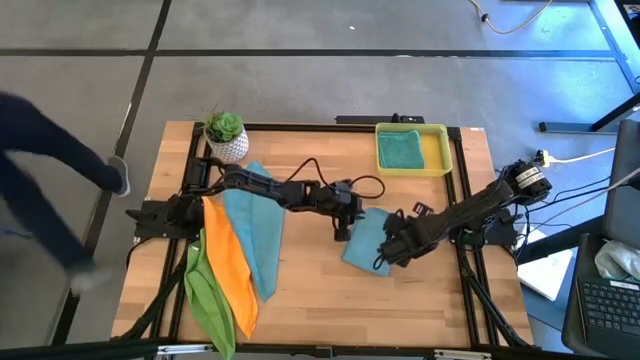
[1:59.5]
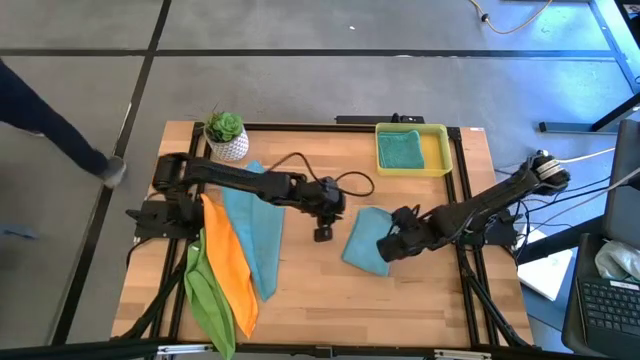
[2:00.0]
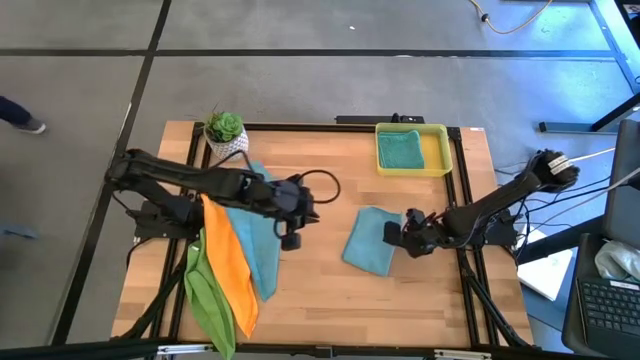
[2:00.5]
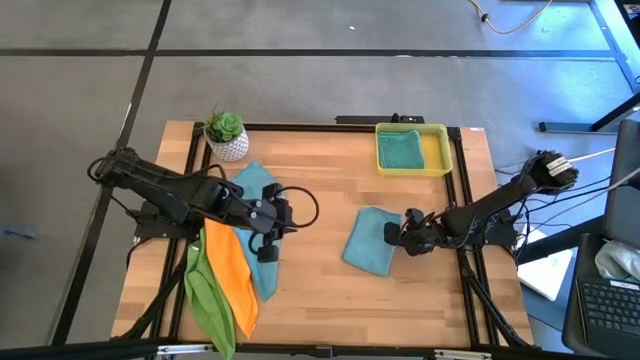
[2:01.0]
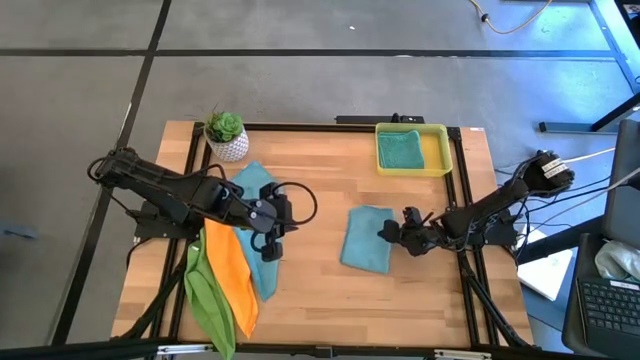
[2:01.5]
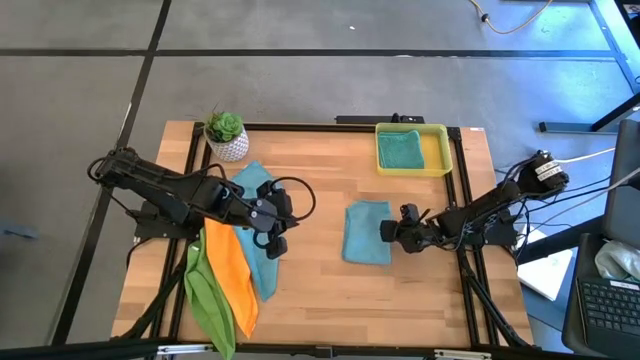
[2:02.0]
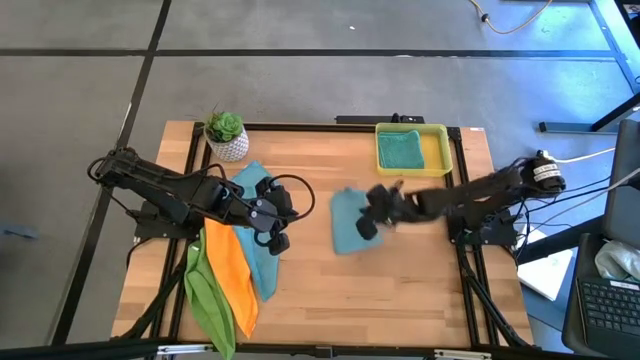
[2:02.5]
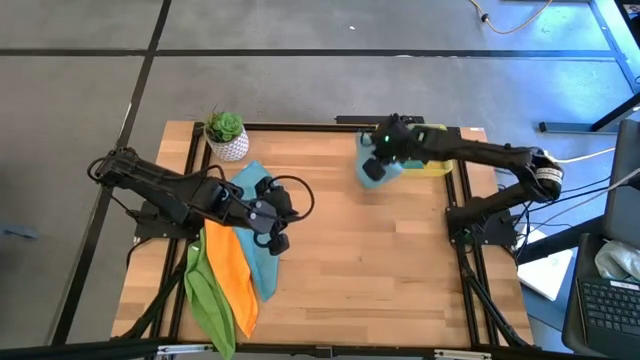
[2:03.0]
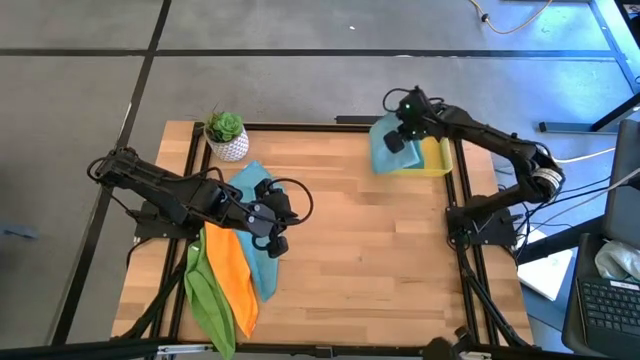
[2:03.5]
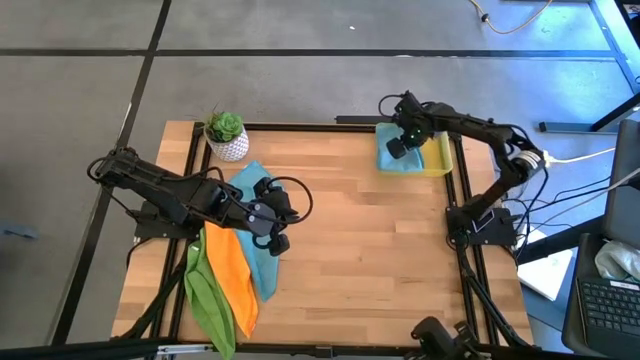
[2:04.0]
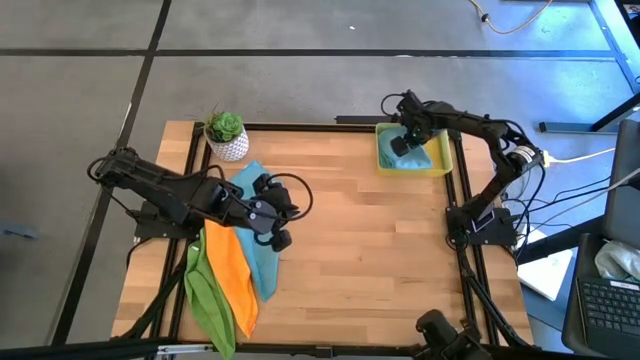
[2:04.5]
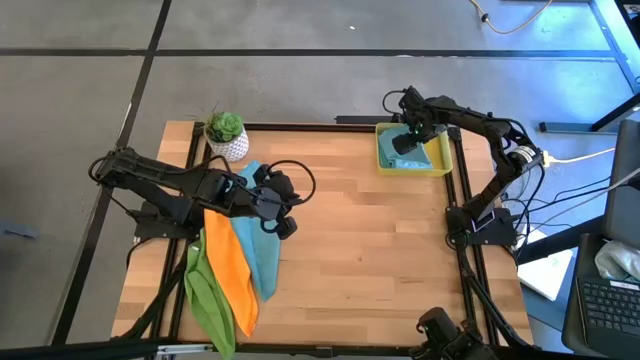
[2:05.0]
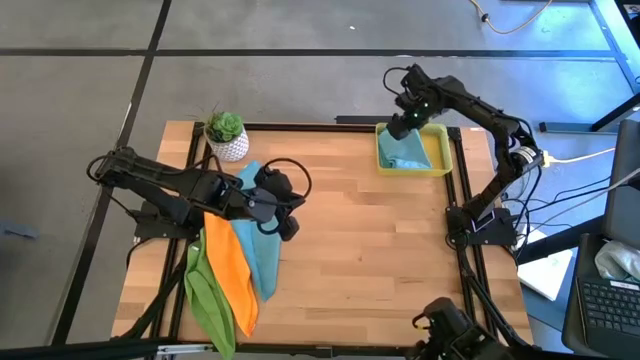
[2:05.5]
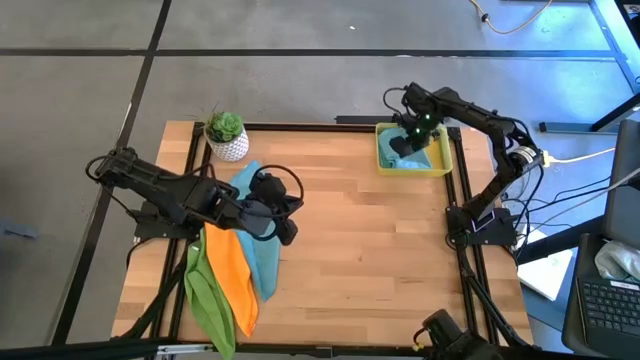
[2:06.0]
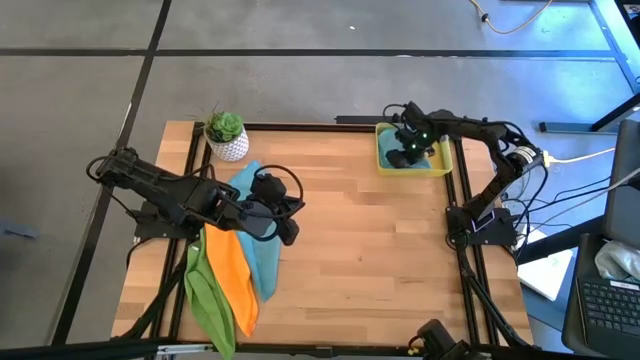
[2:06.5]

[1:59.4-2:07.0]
Task: Fold microfiber towels
Put the folded blue microfiber towel into the bin

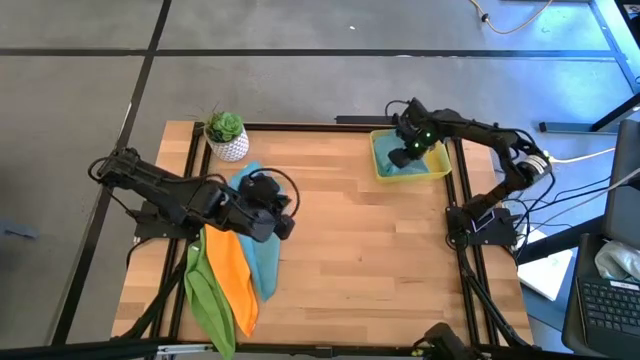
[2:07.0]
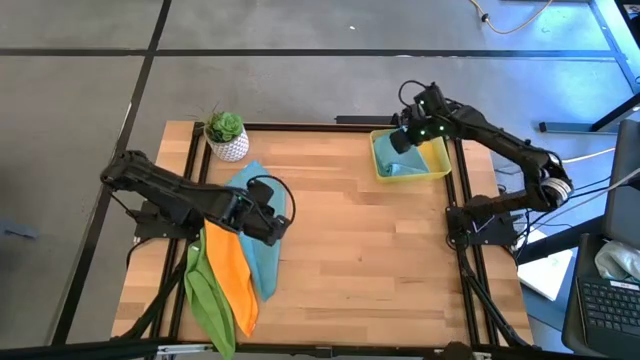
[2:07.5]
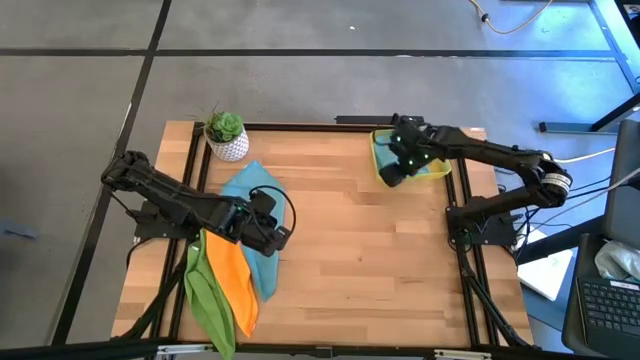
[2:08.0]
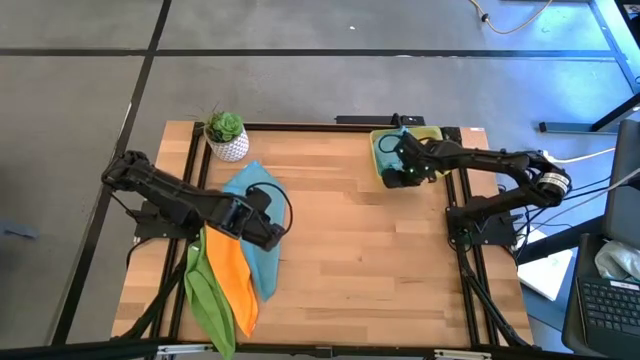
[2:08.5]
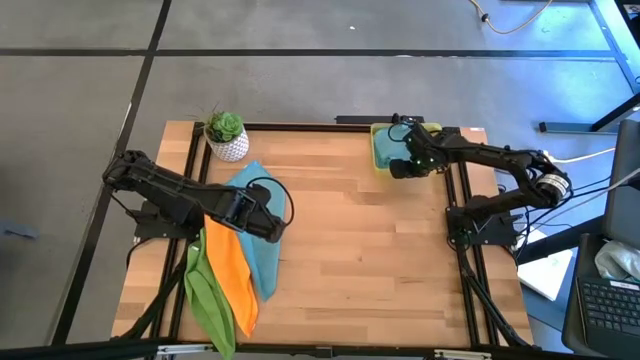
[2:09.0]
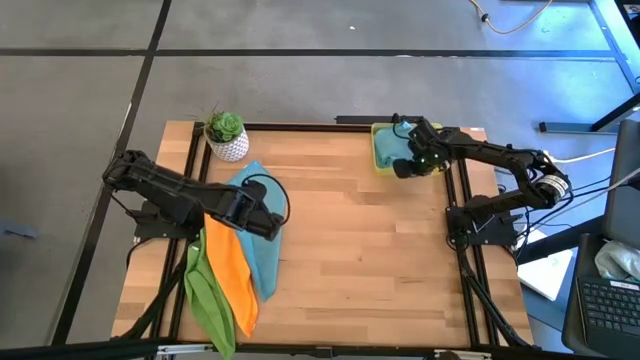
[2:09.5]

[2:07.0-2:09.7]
Adjust the bin

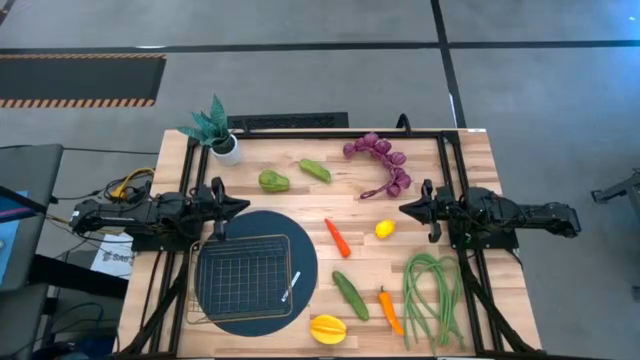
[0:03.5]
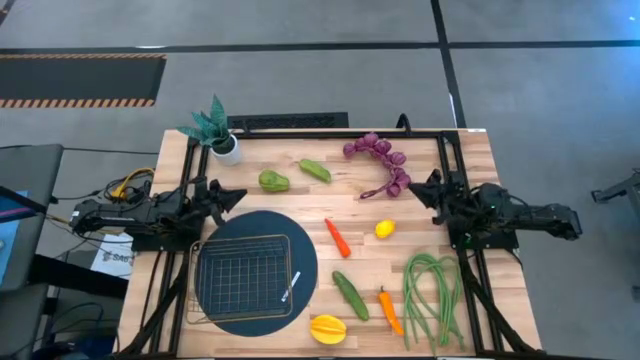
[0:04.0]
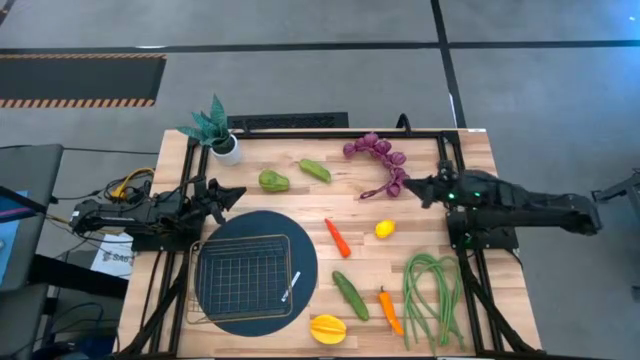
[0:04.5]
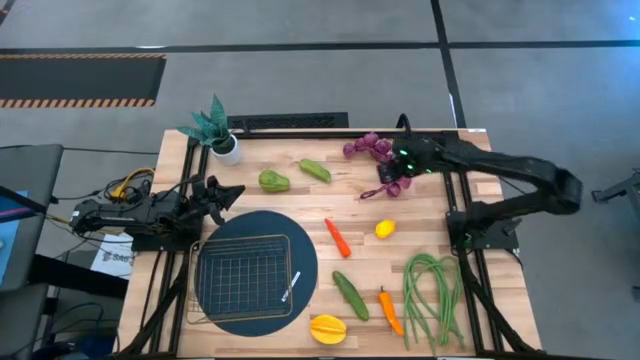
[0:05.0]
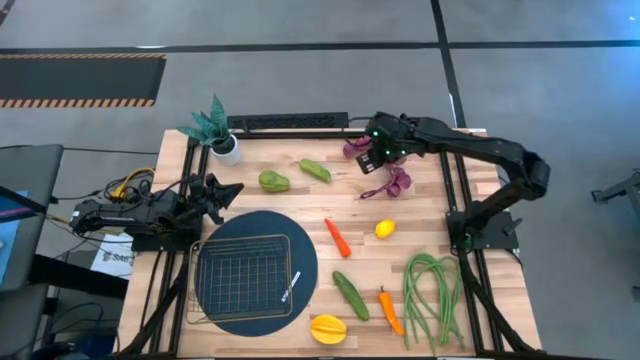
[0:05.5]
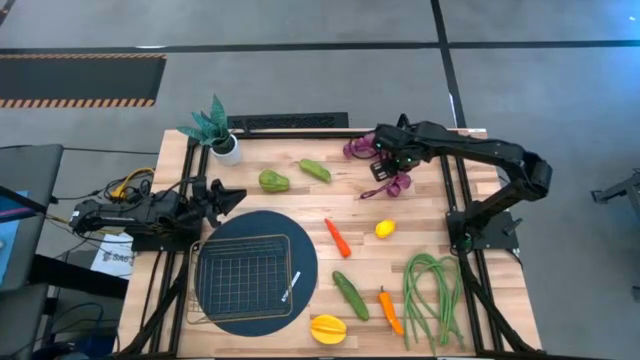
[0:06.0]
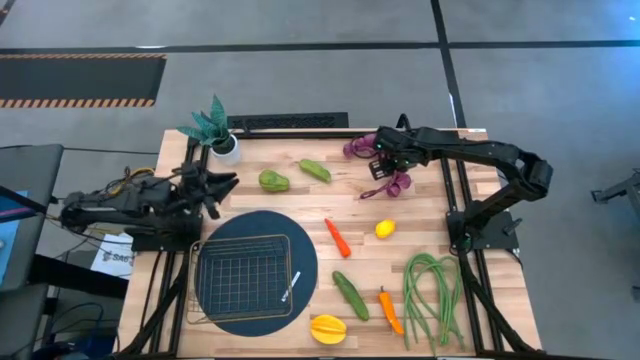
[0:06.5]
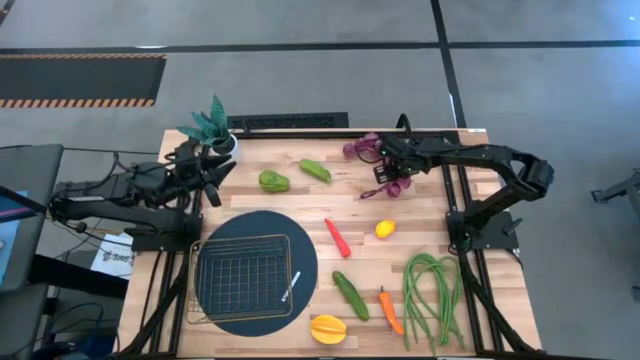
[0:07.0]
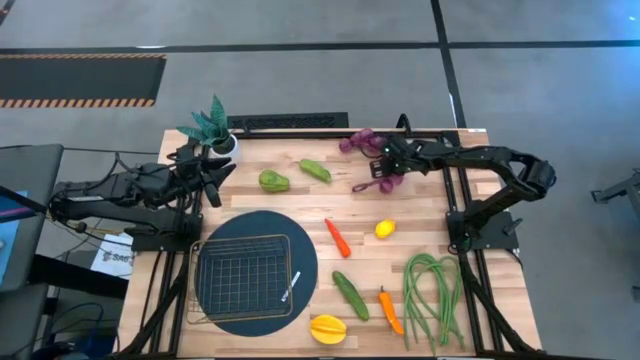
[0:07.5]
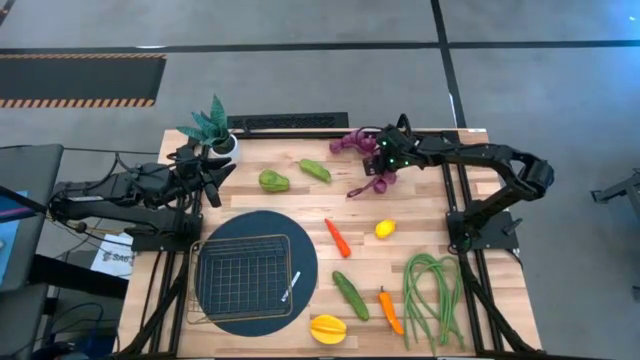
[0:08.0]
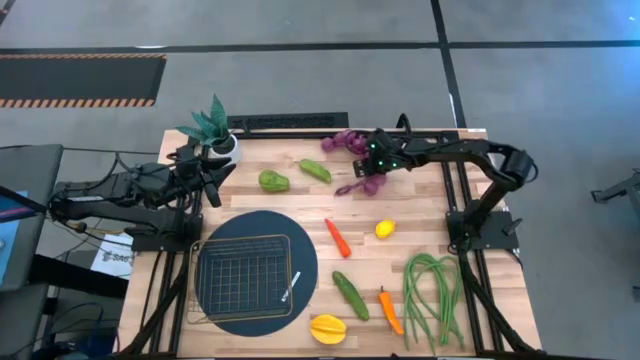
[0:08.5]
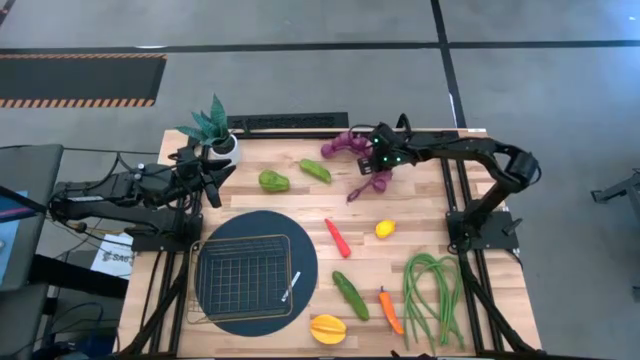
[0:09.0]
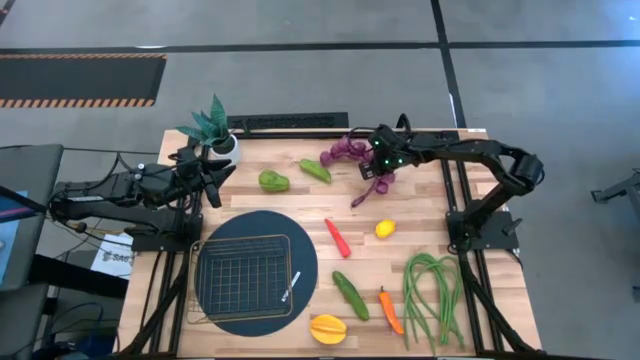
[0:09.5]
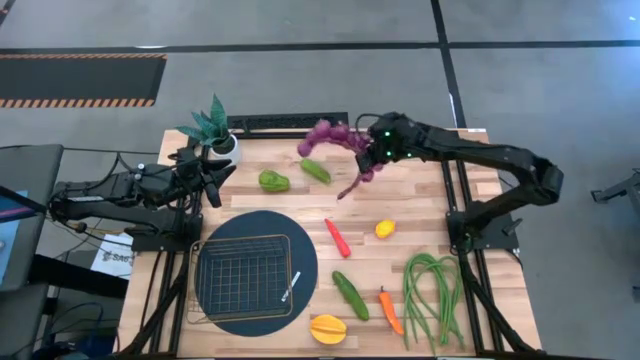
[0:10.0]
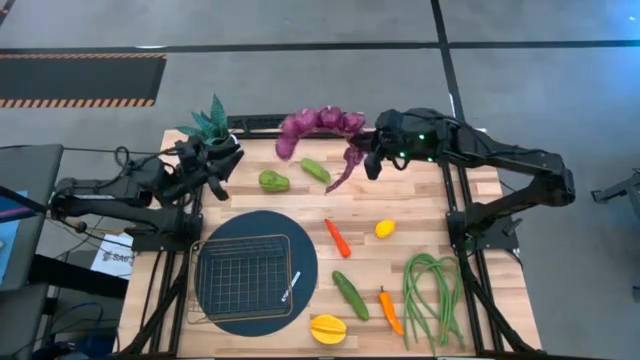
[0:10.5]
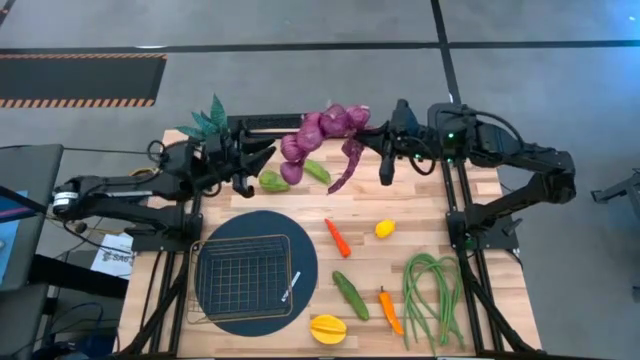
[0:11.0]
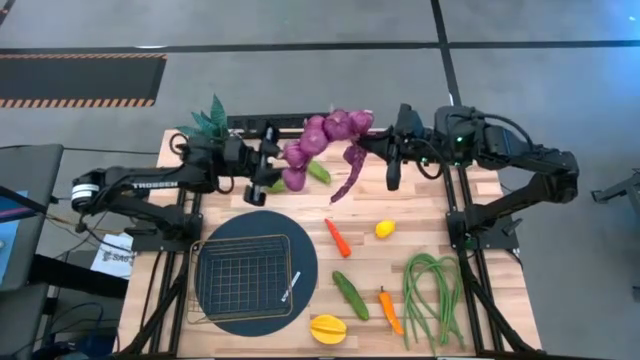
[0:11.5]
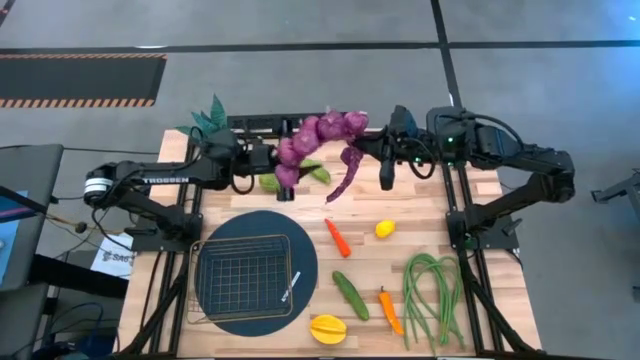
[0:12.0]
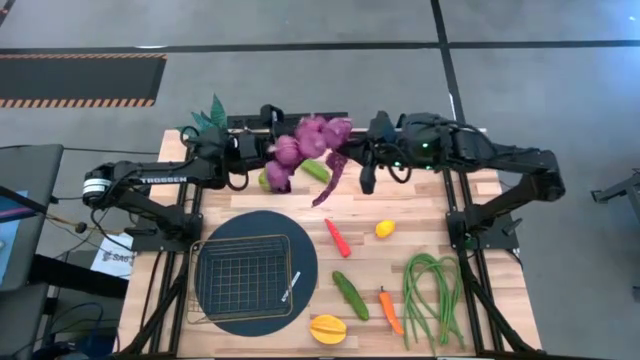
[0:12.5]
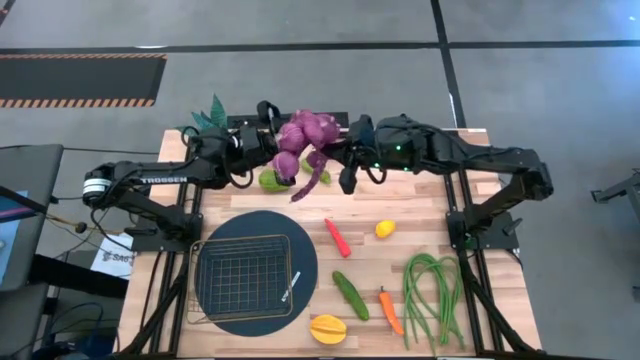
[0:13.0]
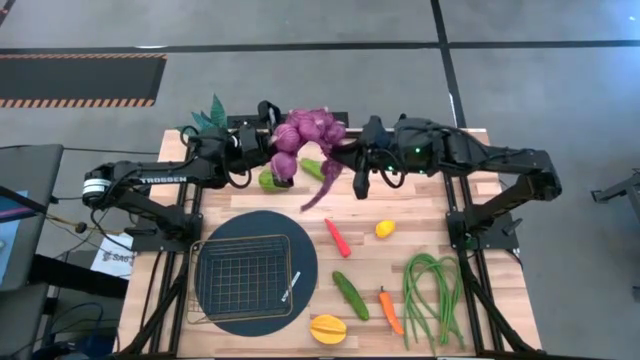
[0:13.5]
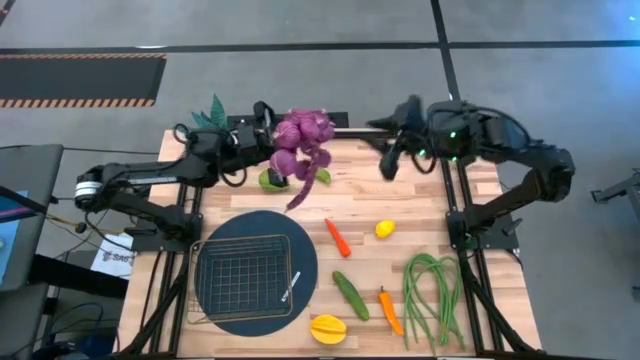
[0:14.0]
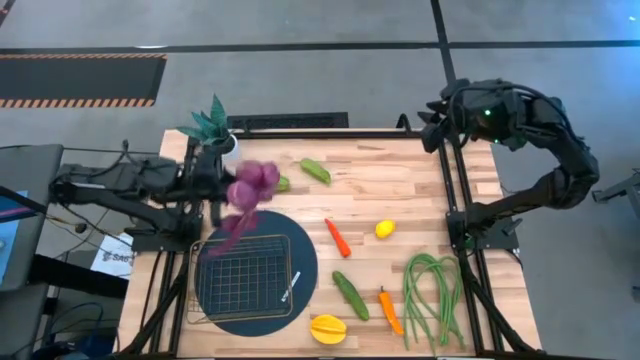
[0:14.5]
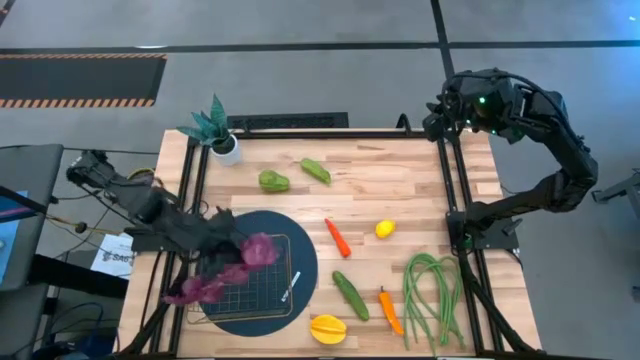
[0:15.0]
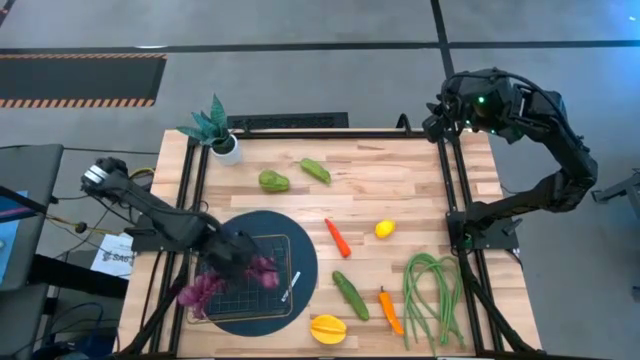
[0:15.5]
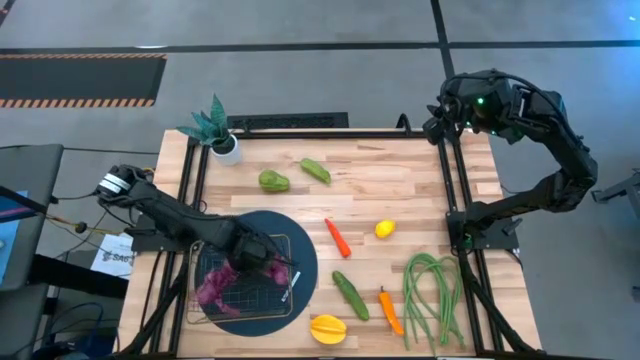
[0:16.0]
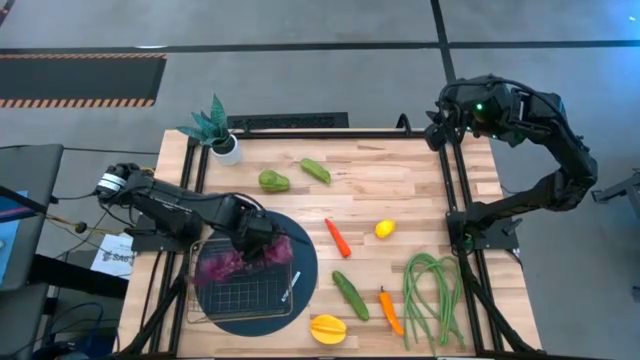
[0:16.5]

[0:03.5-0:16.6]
Task: Build produce basket
Put the purple garlic into the wire basket
